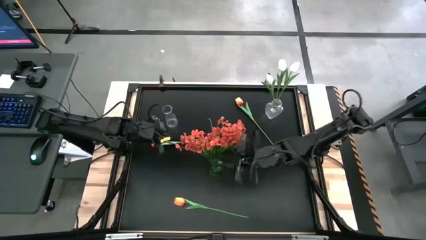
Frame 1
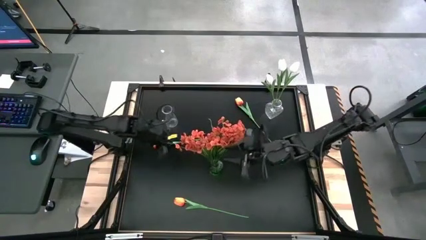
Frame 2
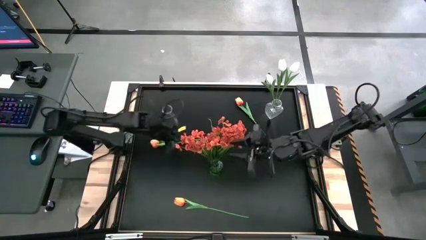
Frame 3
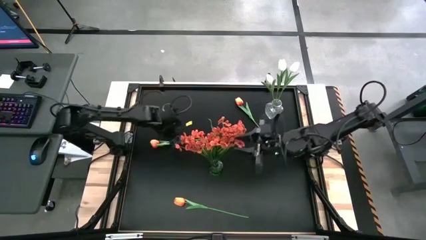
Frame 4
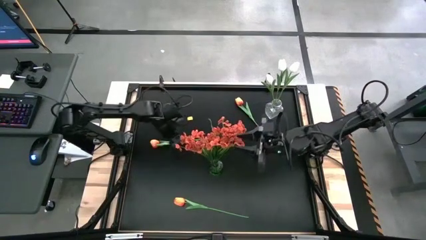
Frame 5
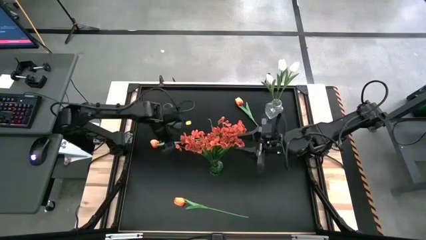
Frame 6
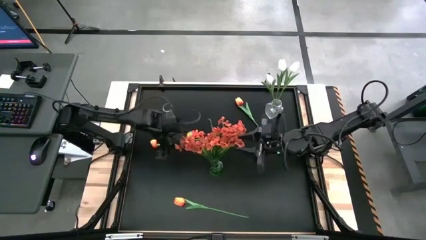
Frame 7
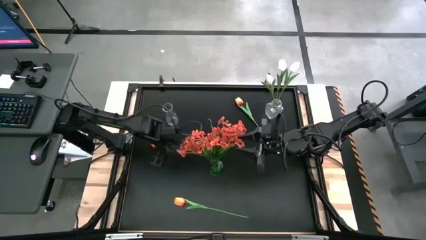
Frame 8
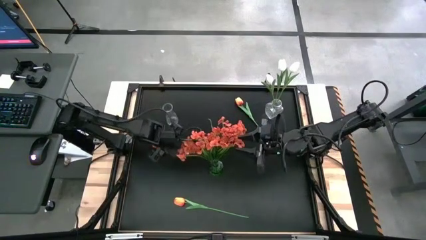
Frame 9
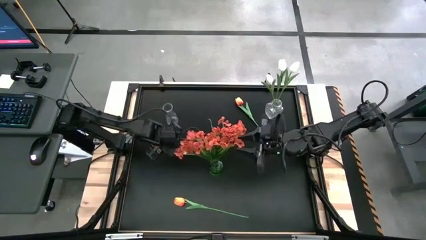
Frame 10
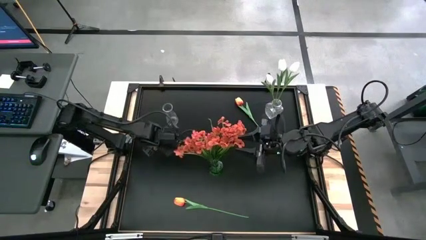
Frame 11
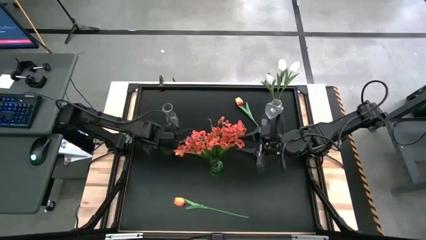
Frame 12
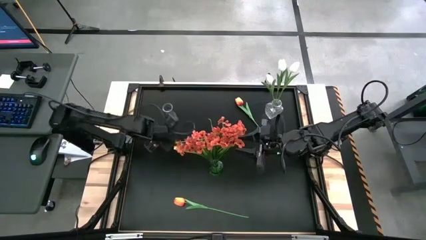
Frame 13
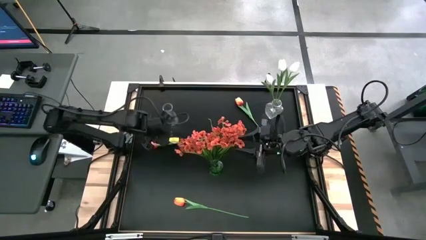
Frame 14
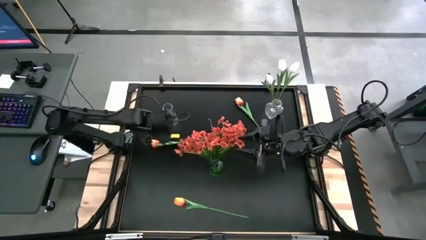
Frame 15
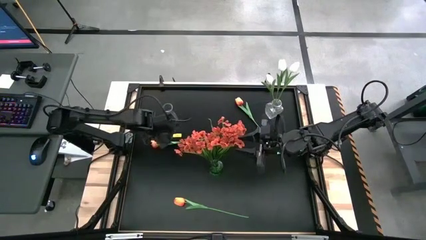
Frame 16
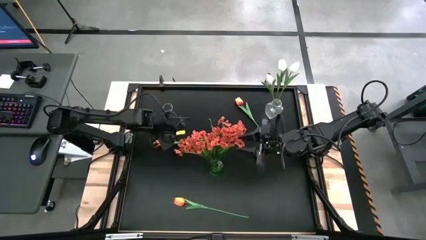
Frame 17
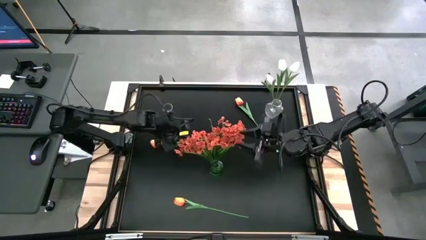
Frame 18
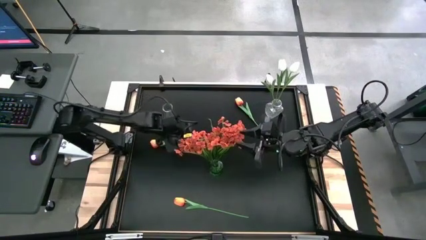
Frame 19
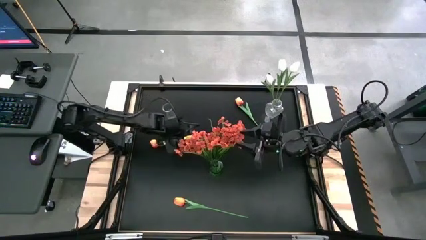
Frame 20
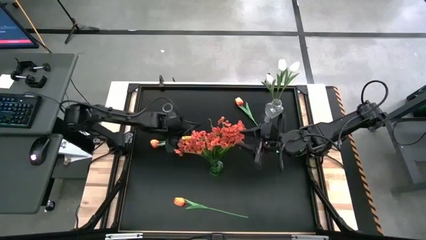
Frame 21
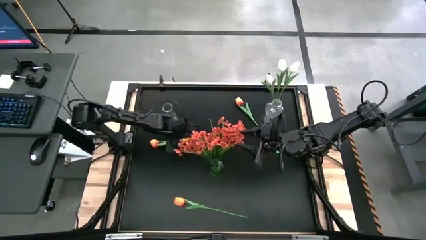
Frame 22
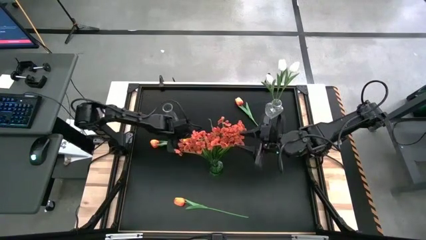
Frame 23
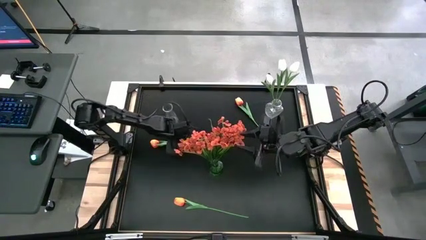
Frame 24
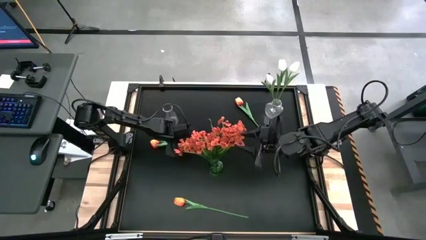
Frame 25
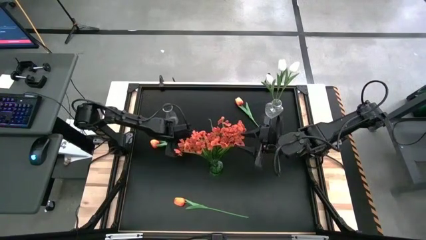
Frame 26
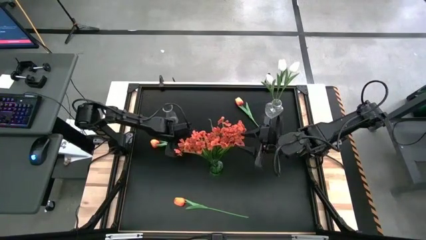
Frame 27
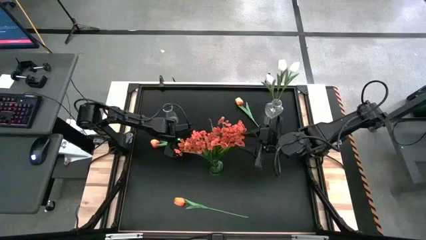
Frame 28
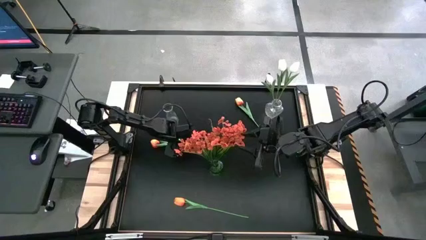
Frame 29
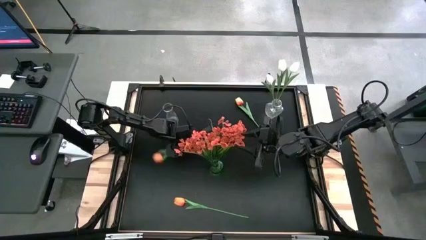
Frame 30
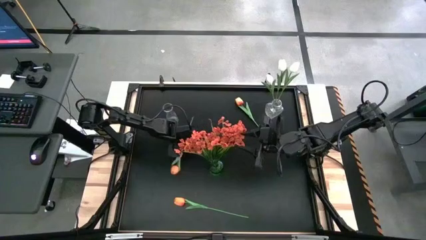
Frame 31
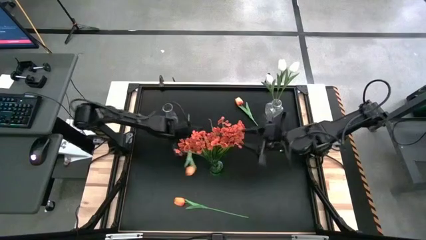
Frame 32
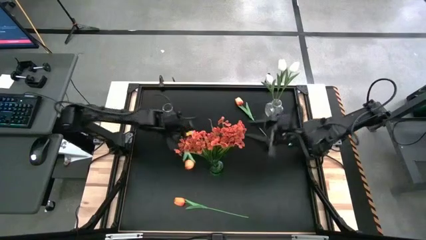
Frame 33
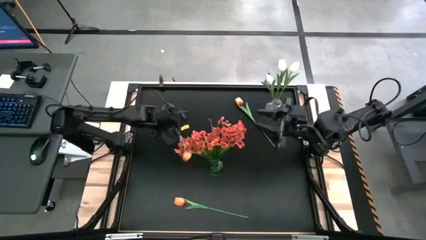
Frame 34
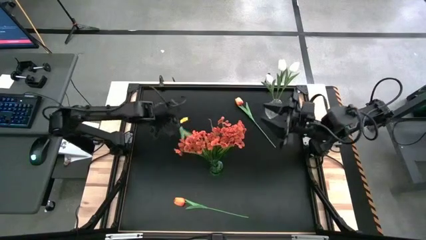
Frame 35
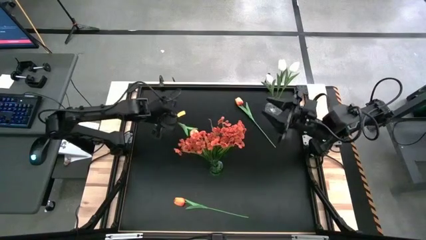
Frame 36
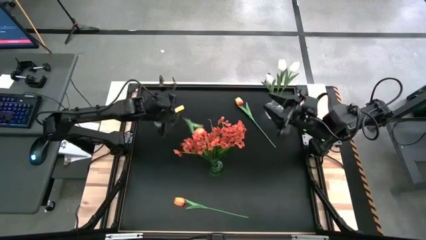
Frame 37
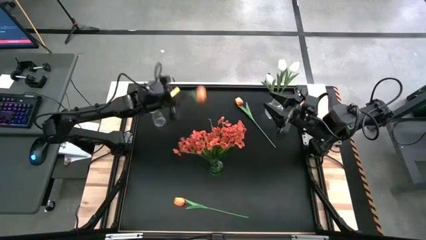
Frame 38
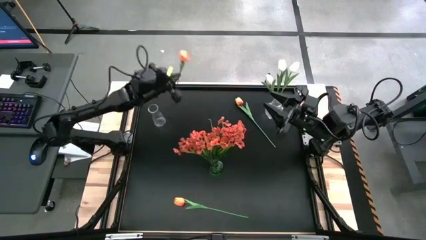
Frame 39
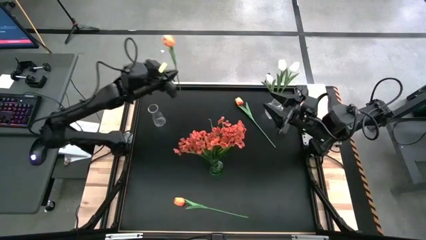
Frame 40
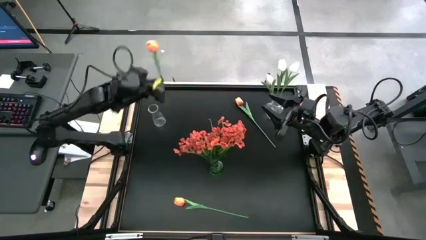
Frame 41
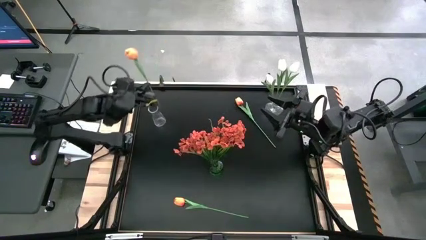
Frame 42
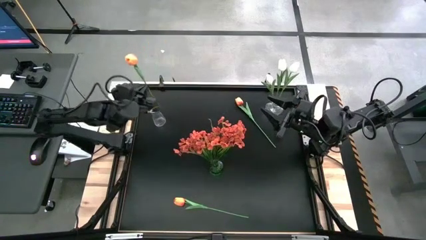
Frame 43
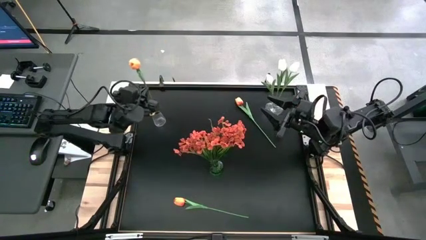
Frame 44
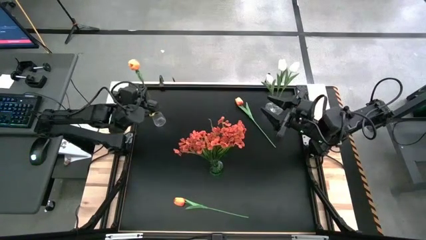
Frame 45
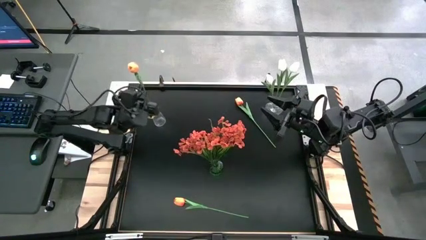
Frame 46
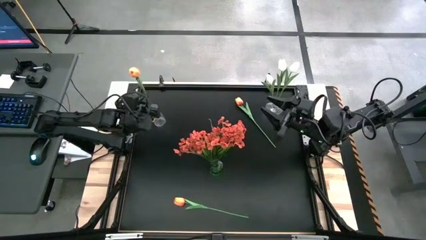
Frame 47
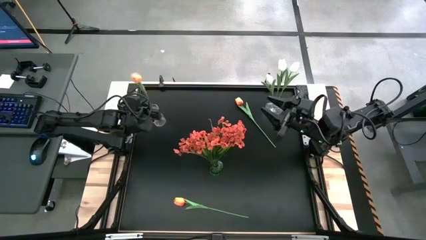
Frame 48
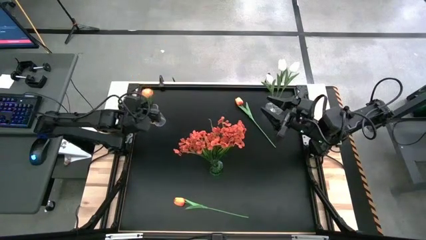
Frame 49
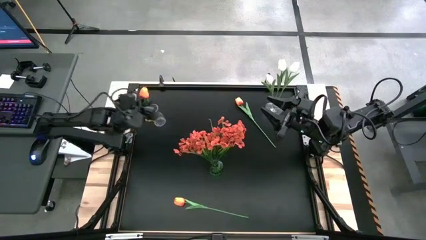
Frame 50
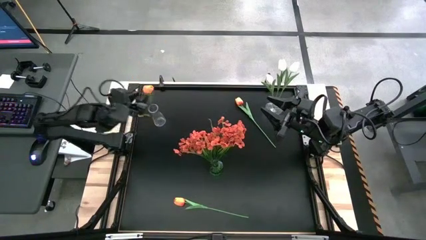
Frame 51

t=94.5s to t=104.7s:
Task: Sort flowers into vase by color
Put the middle left light orange flower into the left transparent vase

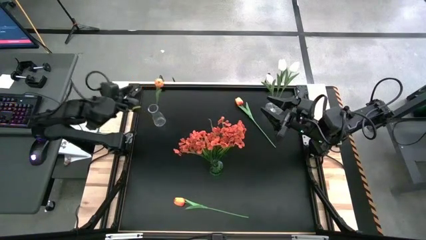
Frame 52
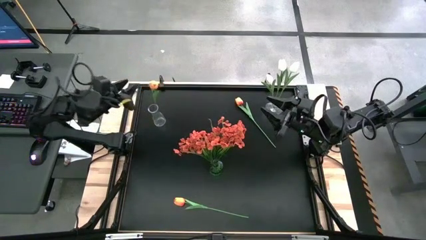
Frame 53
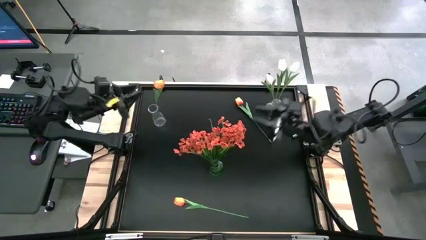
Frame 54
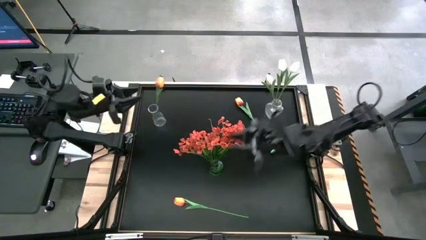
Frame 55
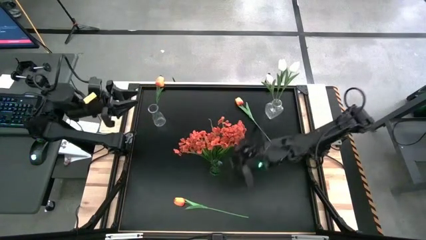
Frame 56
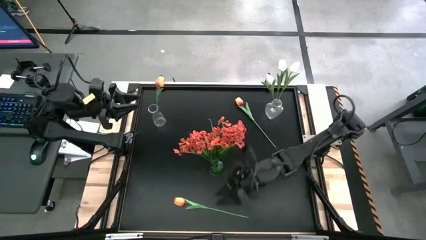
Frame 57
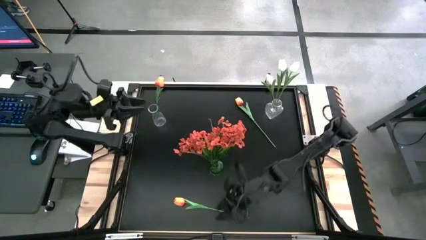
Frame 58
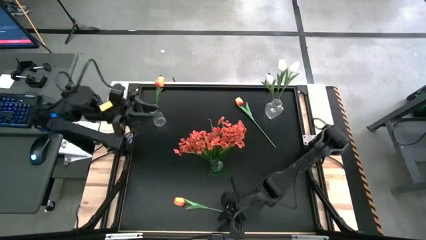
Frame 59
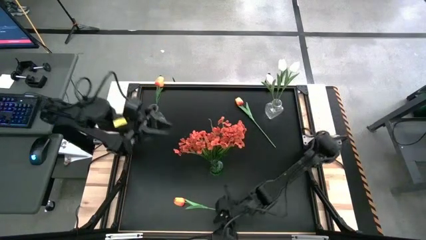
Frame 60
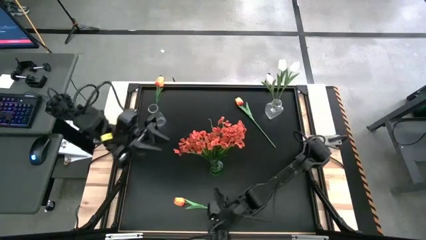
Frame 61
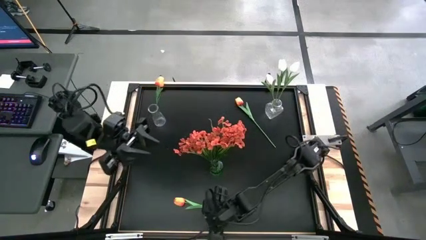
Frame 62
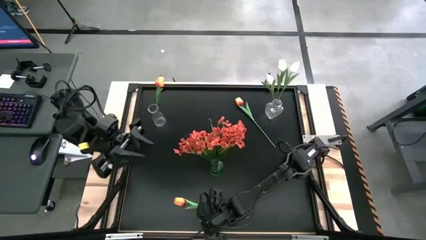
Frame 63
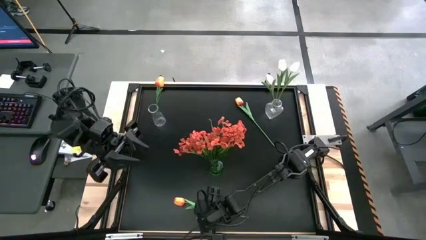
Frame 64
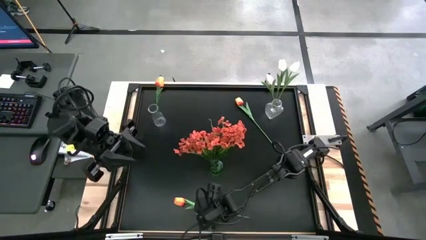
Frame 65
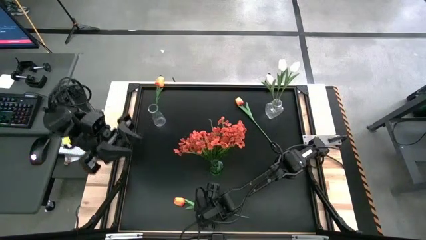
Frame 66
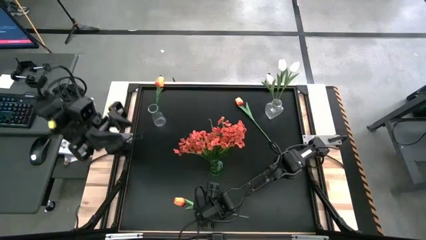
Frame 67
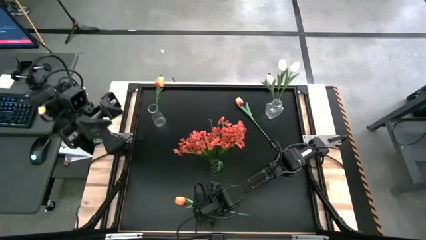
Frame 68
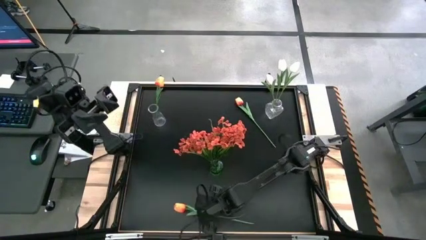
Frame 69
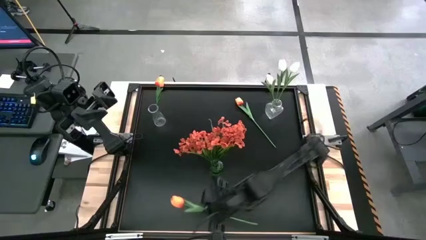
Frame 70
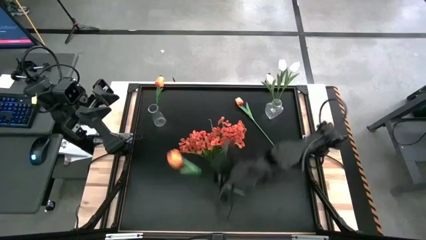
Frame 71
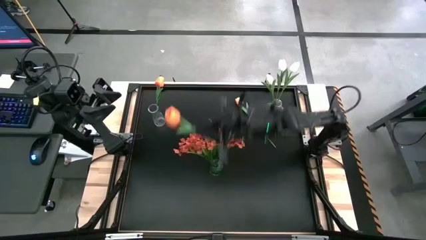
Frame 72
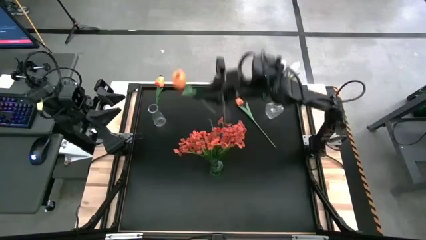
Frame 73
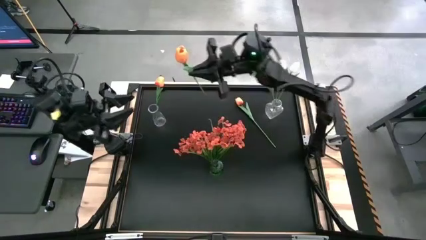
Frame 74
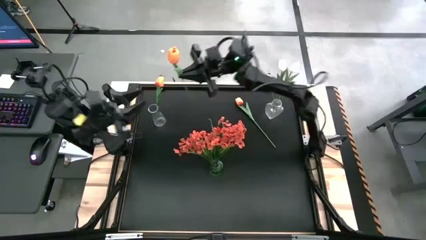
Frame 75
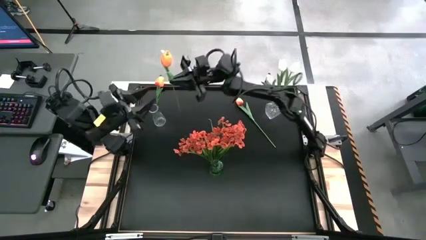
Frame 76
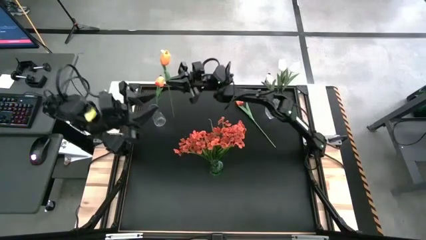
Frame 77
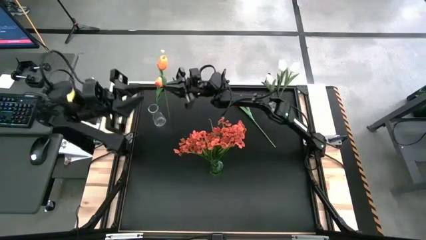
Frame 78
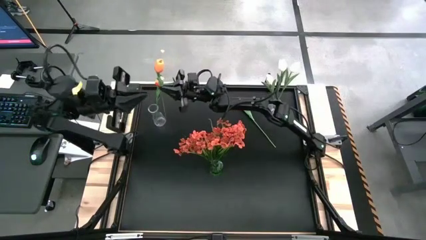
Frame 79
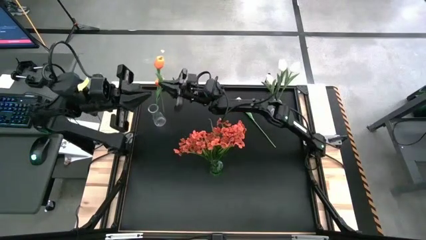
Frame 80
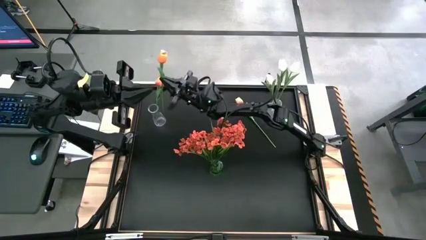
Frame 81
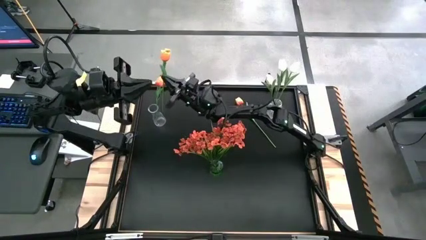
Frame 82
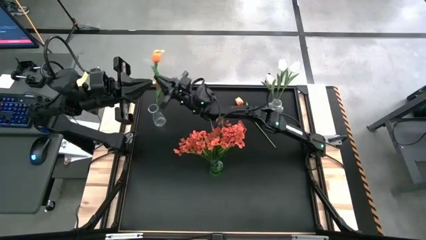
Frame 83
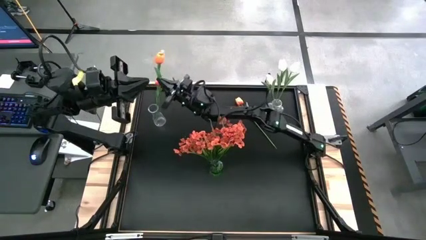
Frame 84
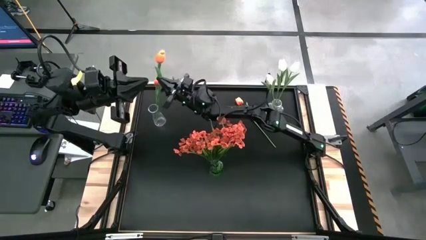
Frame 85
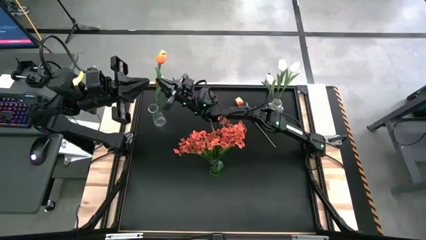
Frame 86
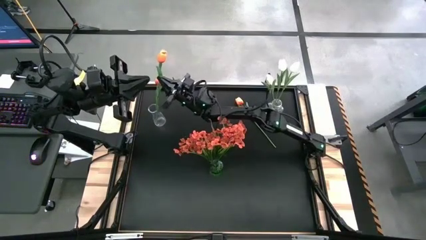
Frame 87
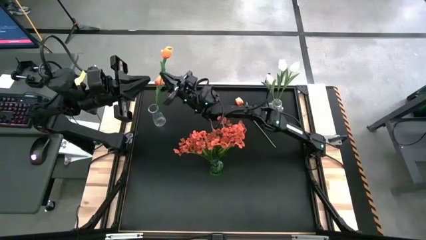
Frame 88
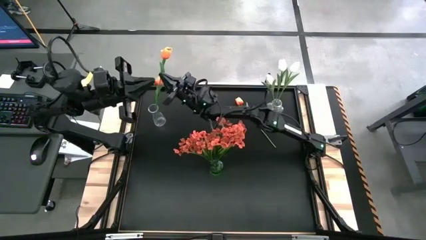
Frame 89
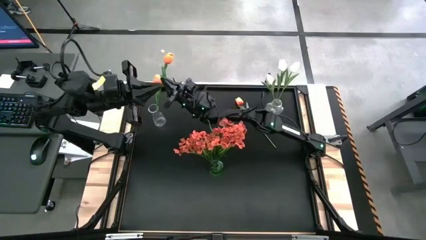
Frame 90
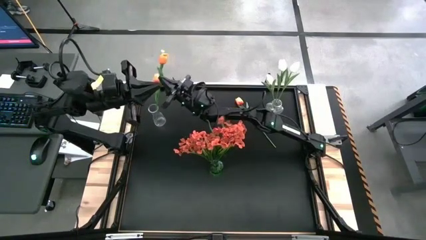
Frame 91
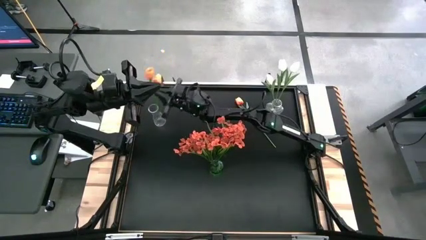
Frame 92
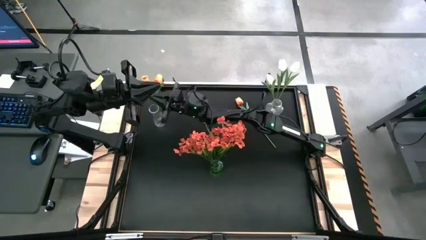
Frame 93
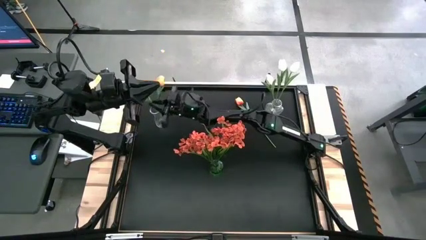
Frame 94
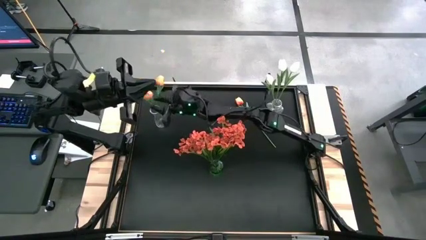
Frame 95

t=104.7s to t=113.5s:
Put the bottom light orange flower into the left transparent vase
